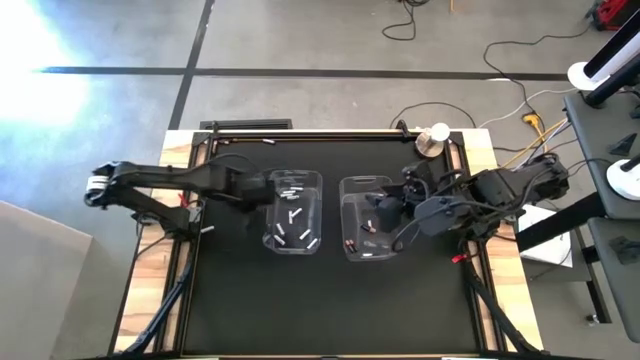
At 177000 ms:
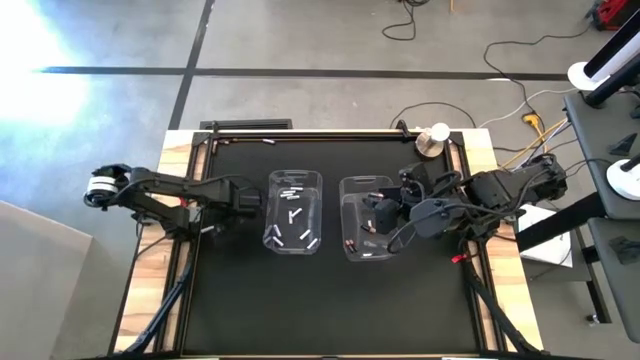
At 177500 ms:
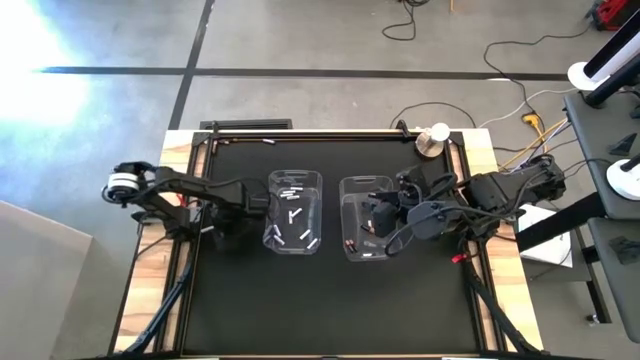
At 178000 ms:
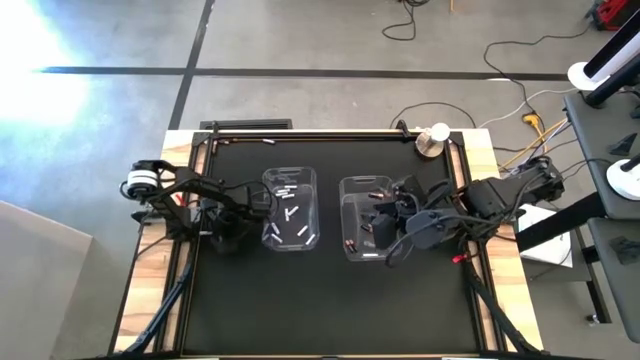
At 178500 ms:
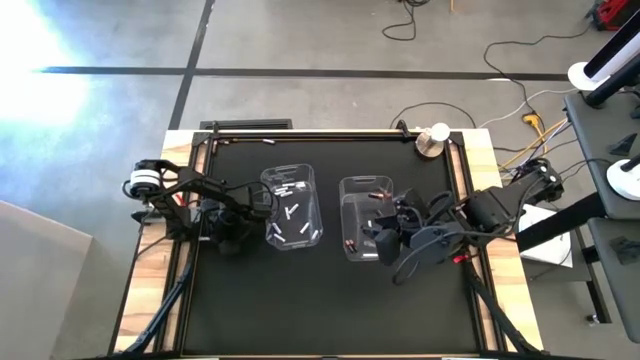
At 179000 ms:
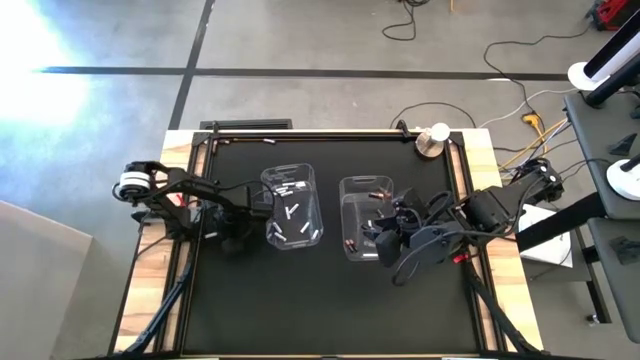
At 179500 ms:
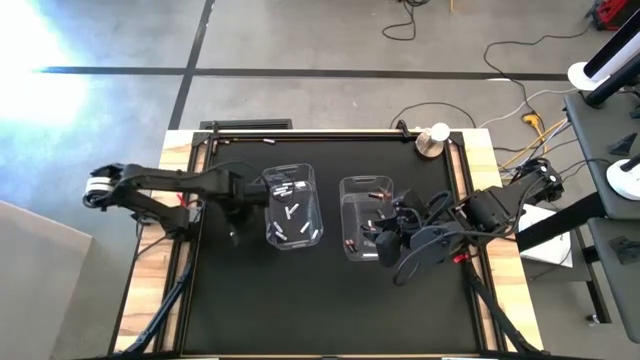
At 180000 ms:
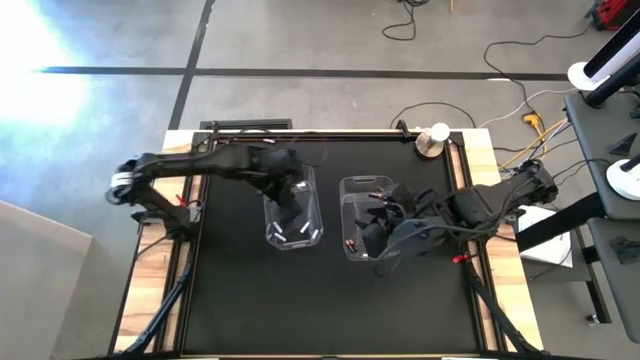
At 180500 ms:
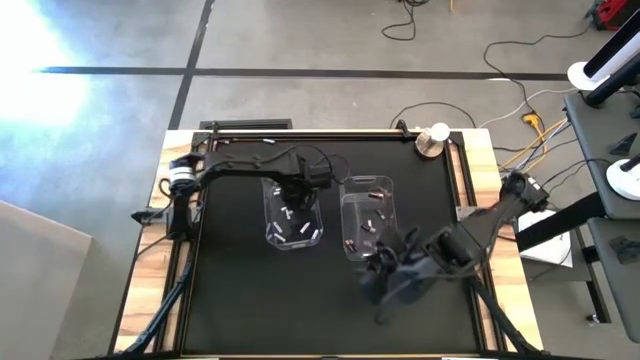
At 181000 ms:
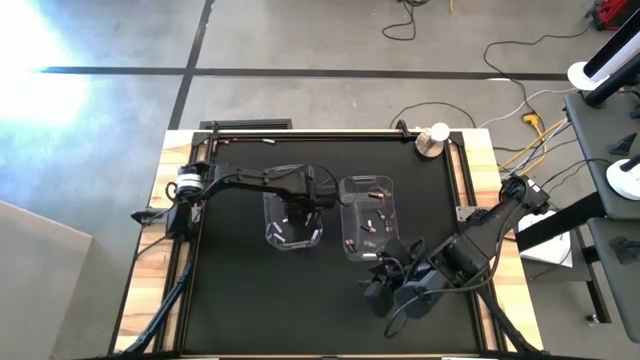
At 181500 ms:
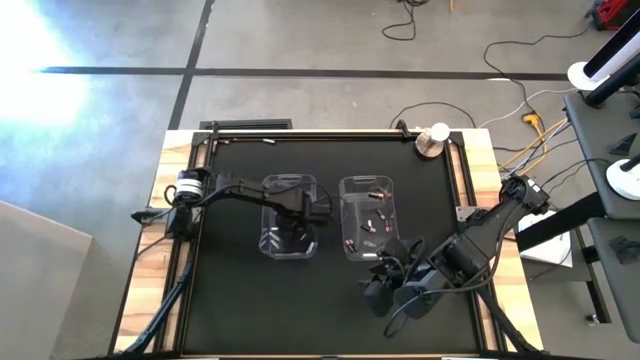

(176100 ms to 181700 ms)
Task: Sort batteries
Put the white battery into the left transparent bin

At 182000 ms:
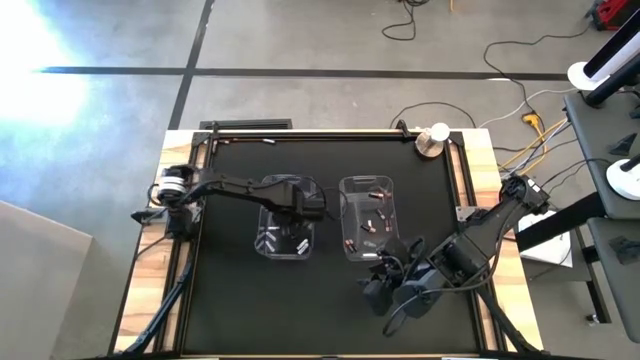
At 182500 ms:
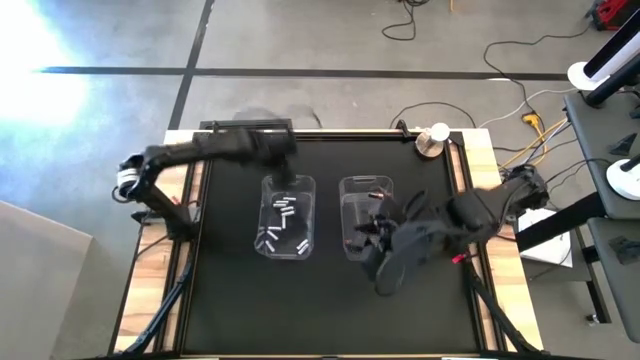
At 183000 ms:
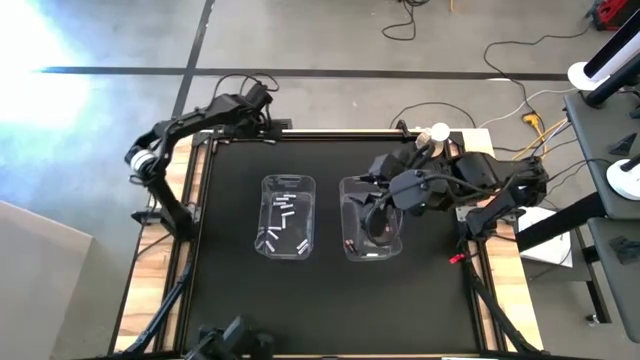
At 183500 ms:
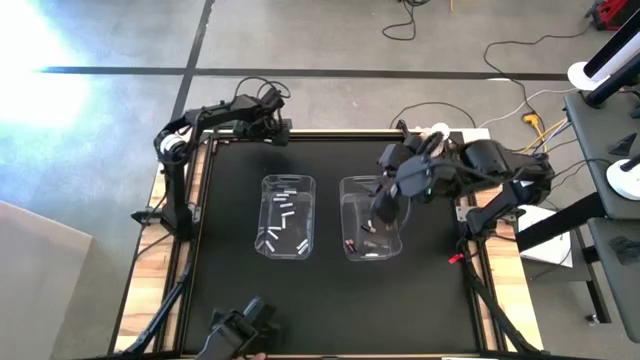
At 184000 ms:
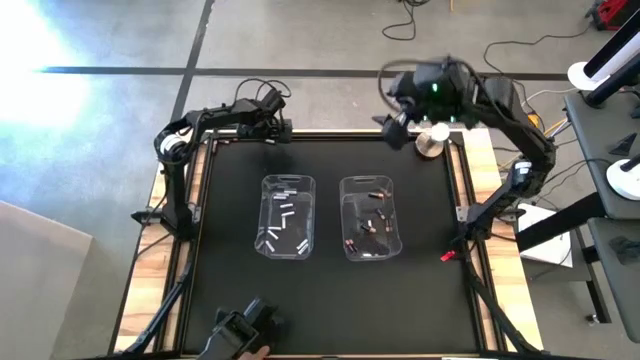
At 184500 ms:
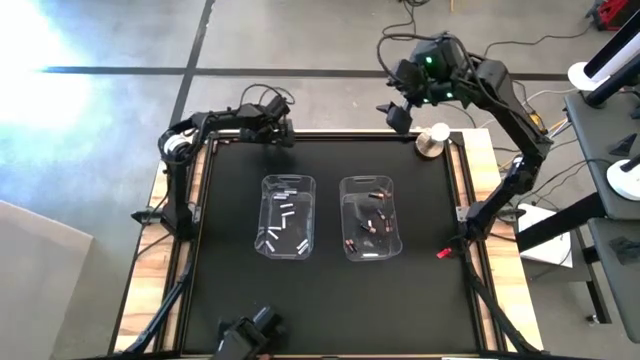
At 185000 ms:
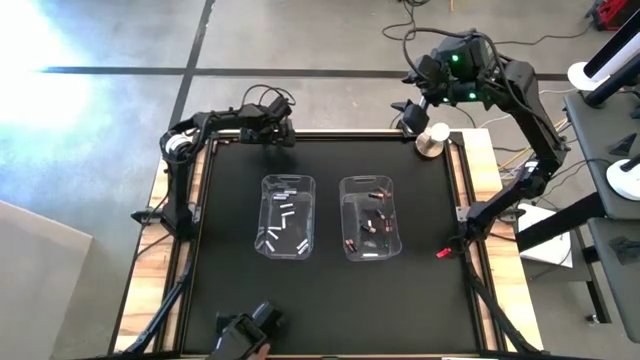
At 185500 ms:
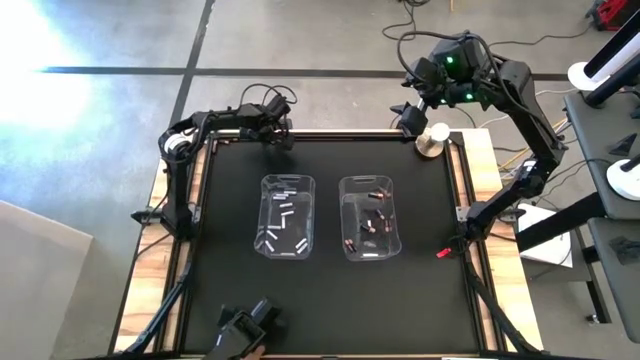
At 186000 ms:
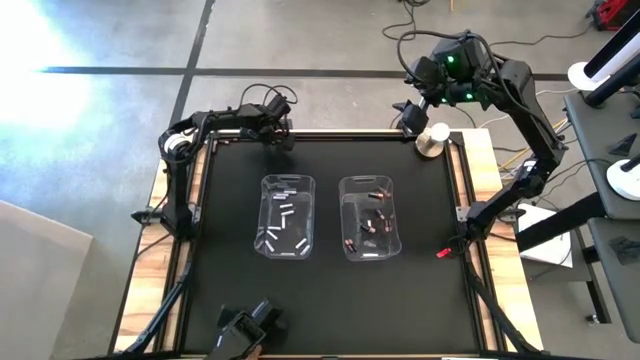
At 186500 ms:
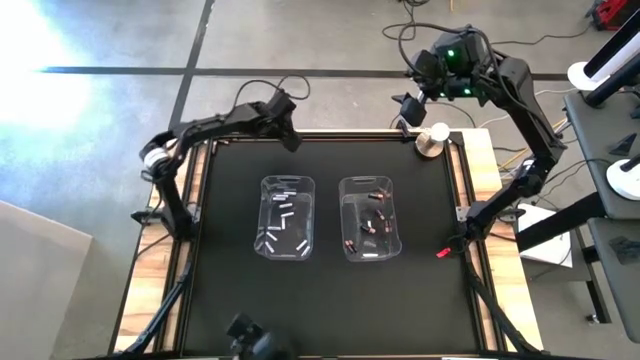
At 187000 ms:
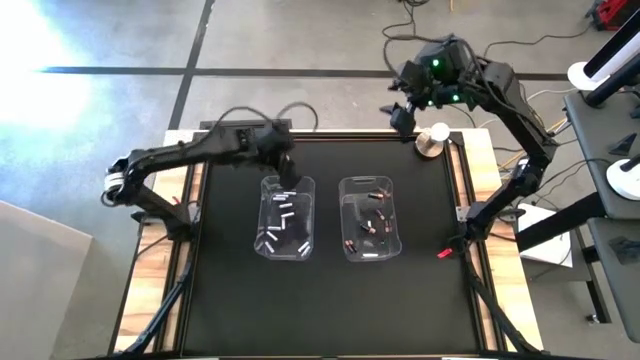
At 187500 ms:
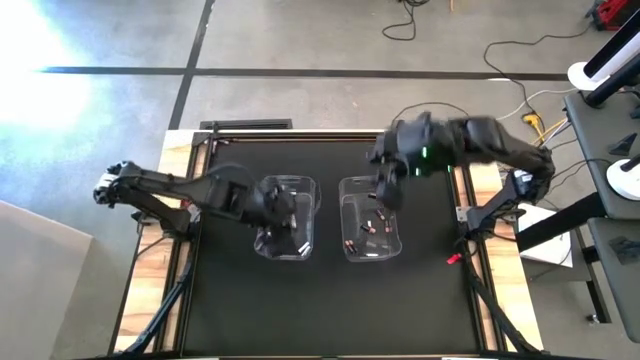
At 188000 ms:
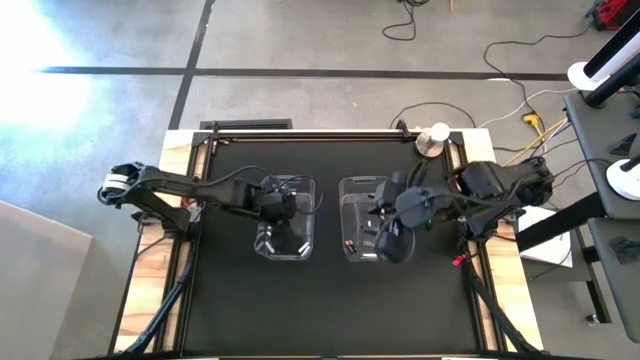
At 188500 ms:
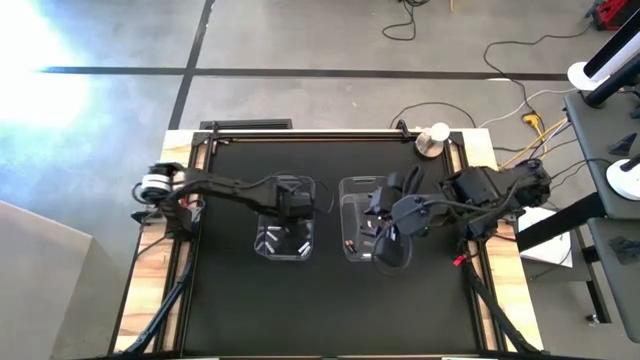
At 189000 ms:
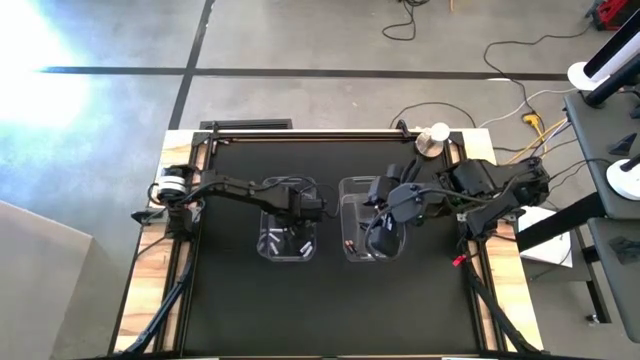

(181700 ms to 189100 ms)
Put the white battery into the left transparent bin

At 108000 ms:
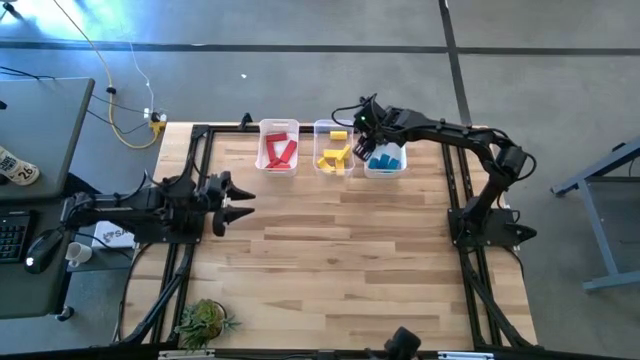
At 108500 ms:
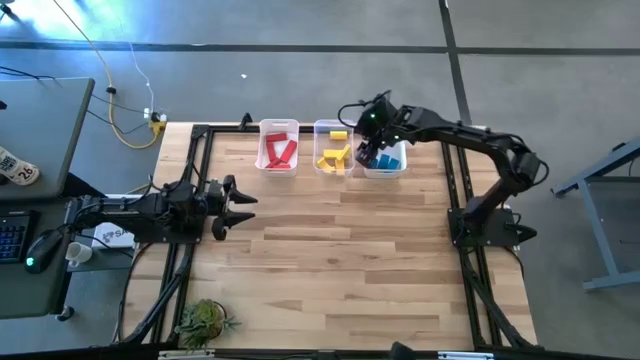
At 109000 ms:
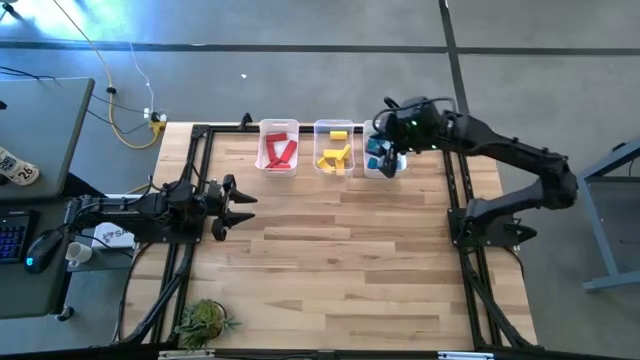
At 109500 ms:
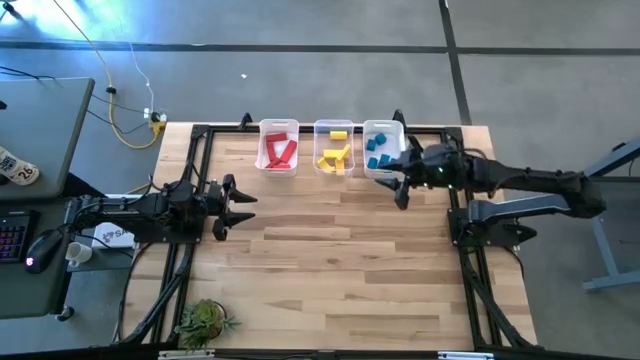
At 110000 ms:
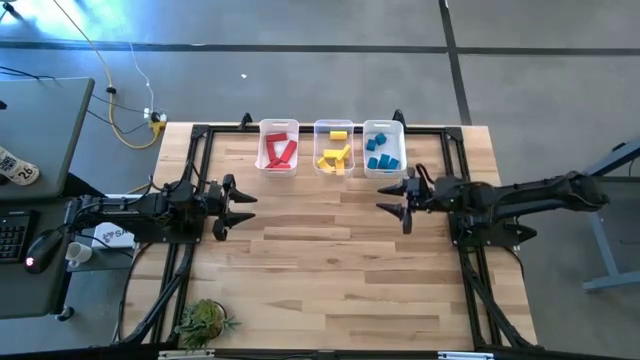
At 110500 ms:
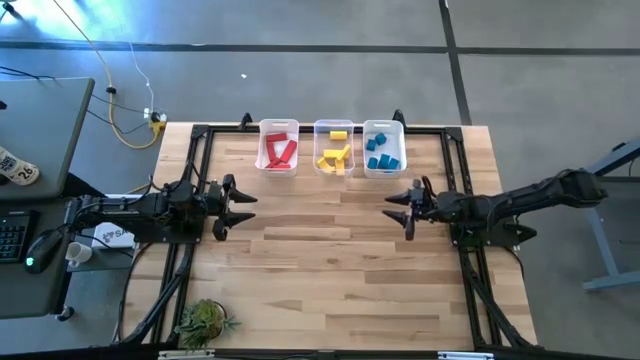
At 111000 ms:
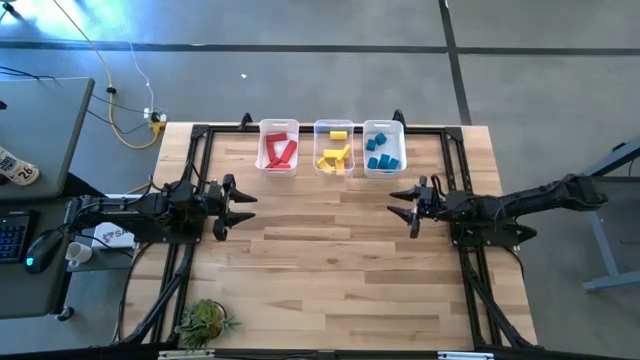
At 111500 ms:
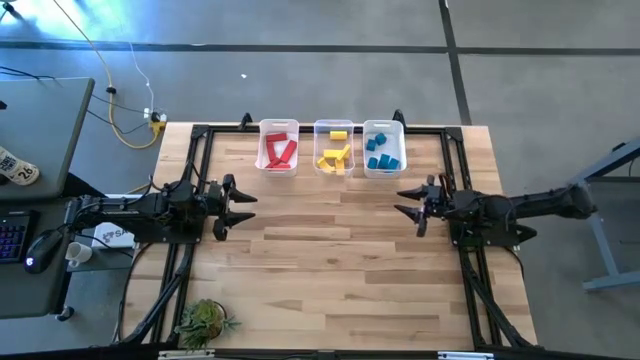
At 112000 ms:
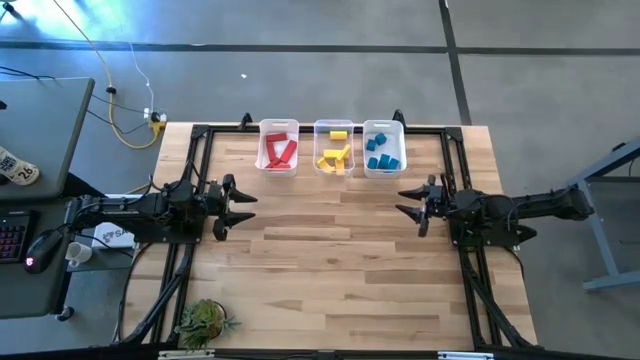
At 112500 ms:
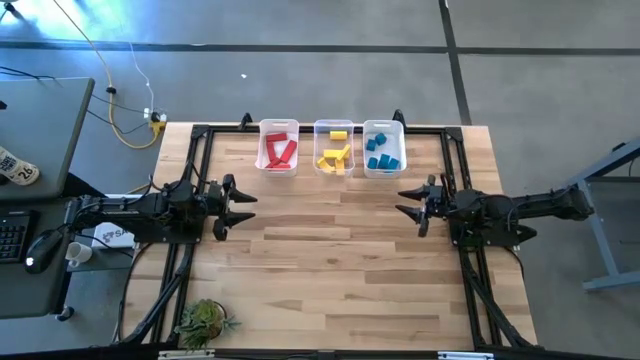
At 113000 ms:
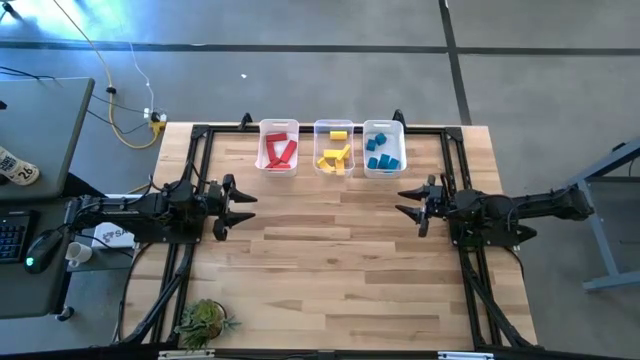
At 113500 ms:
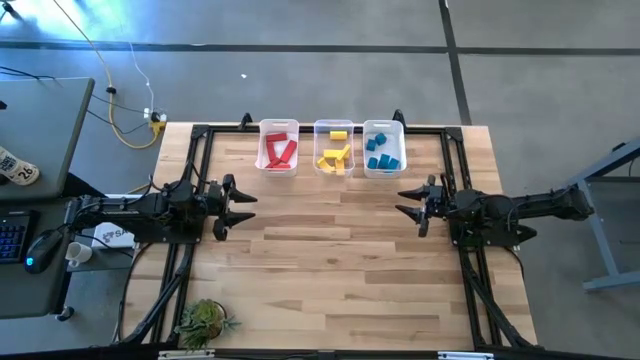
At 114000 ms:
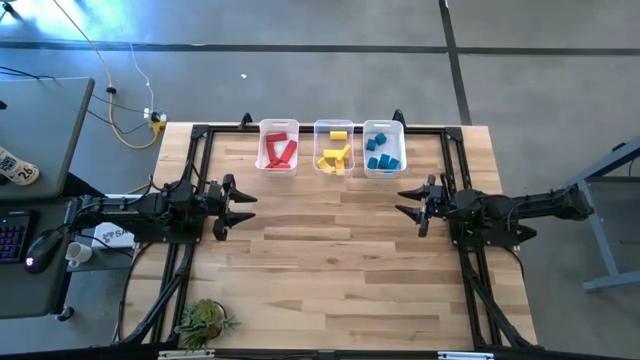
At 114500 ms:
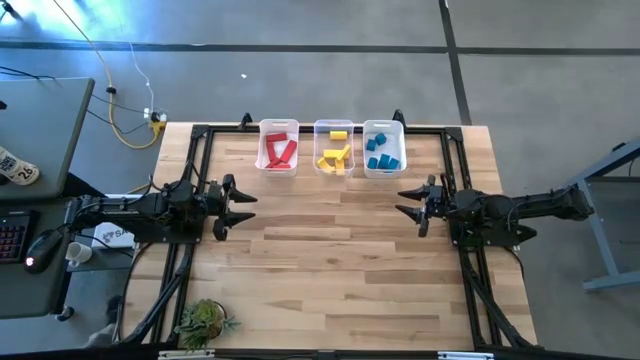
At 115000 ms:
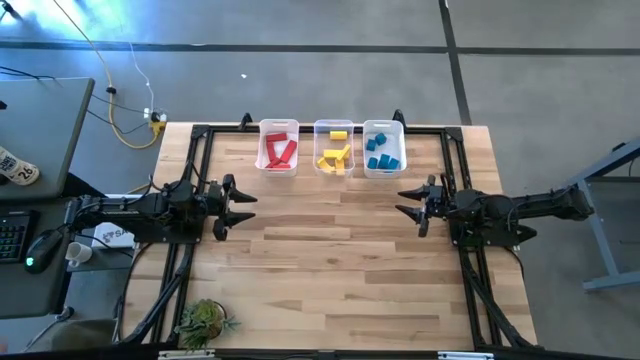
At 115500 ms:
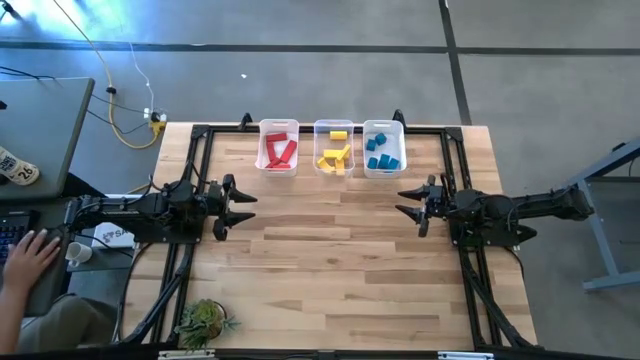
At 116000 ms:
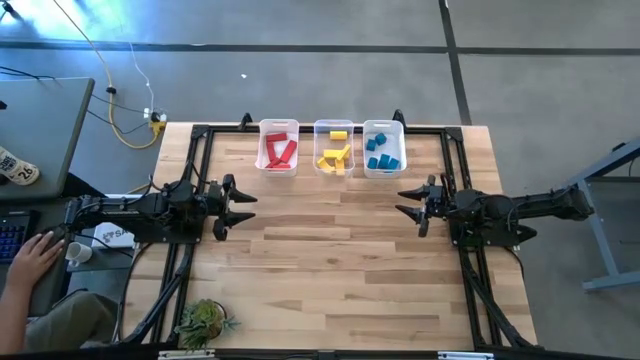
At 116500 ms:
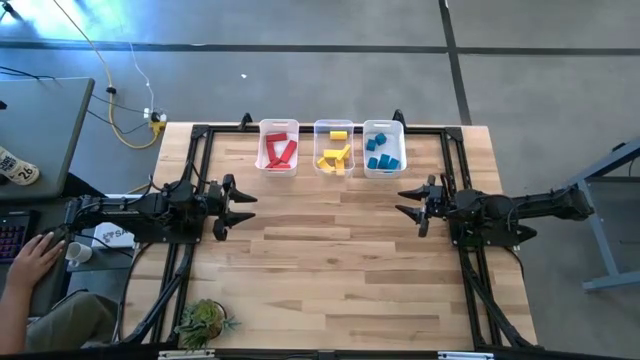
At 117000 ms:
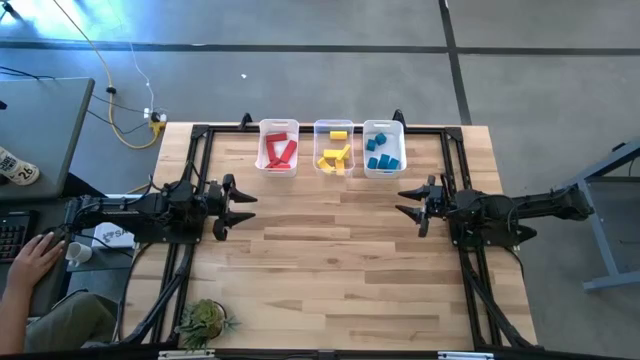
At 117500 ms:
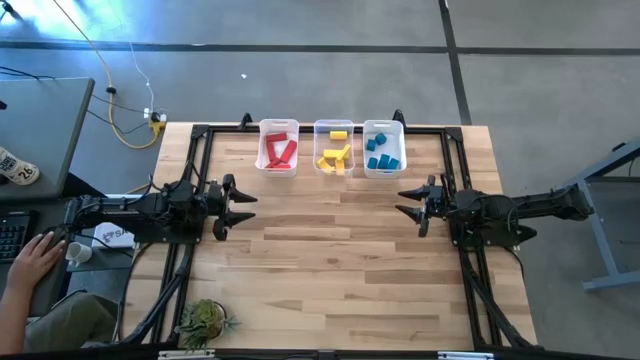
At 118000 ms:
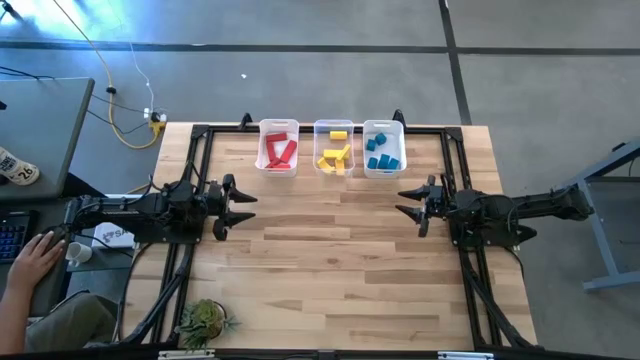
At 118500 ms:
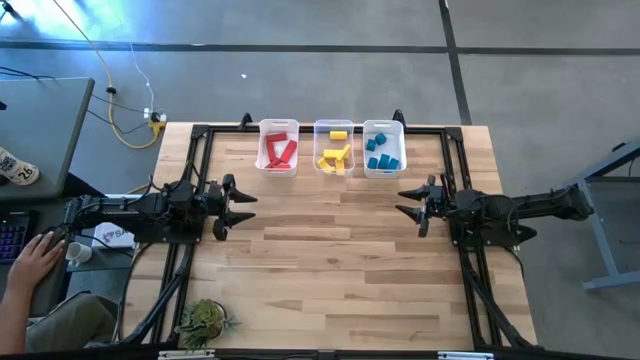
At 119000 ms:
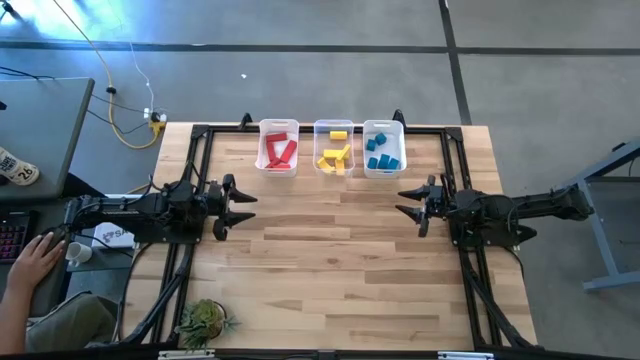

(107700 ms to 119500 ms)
Task: Sort & place blocks by color
Return to Home Position
